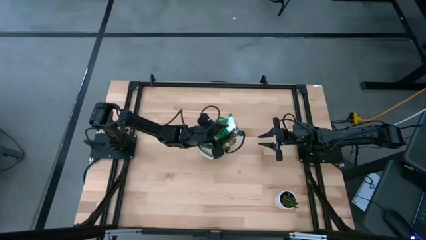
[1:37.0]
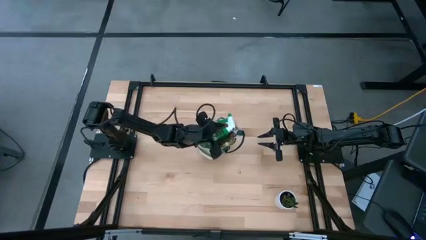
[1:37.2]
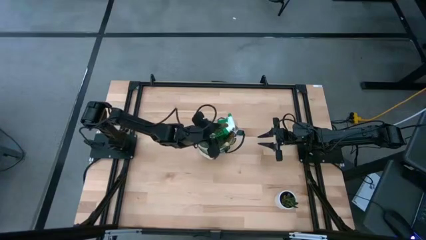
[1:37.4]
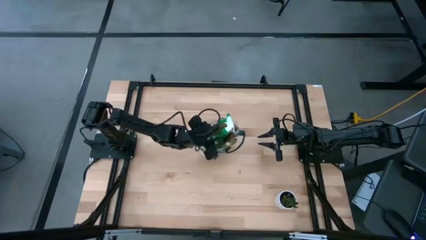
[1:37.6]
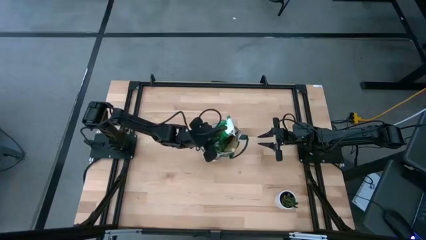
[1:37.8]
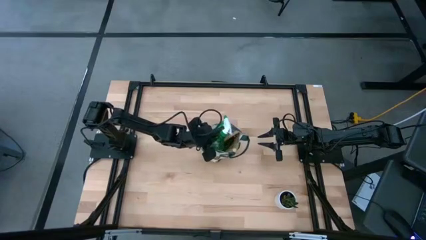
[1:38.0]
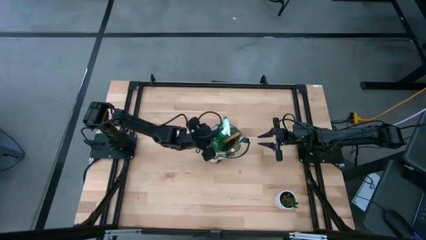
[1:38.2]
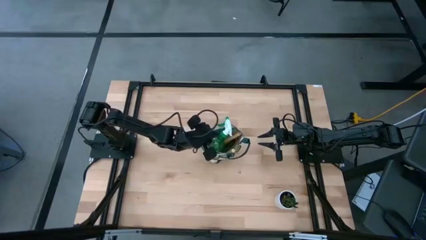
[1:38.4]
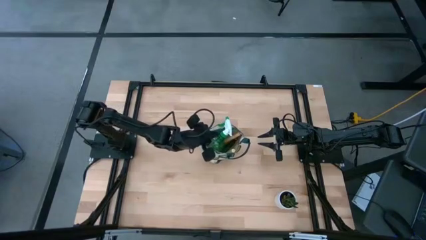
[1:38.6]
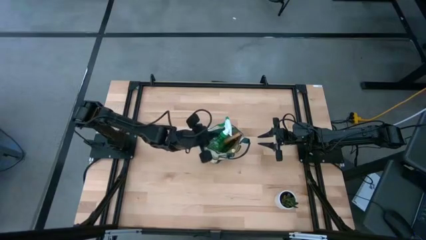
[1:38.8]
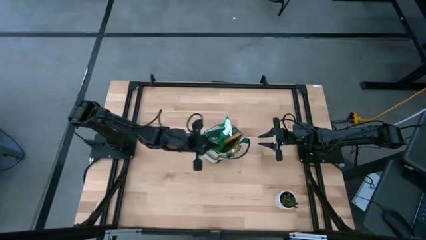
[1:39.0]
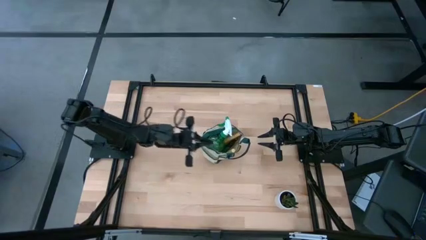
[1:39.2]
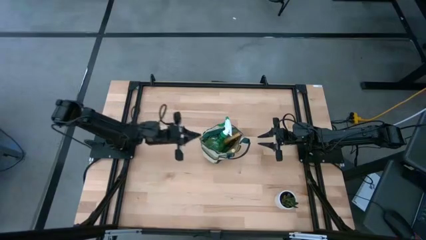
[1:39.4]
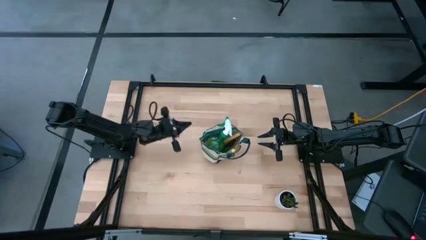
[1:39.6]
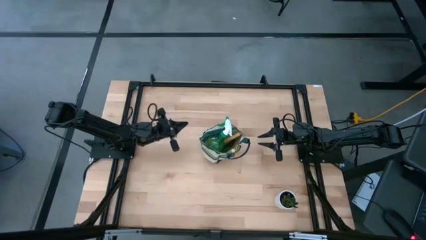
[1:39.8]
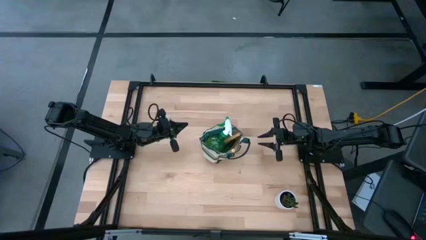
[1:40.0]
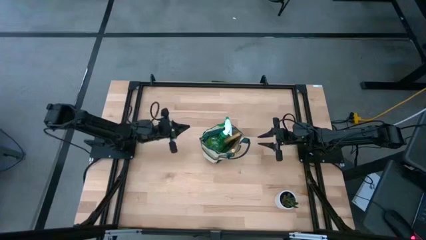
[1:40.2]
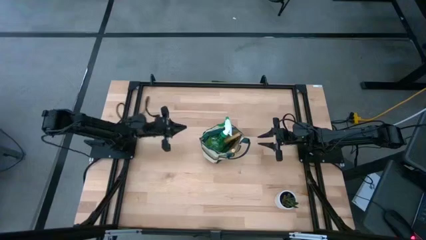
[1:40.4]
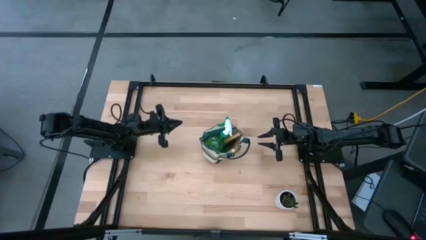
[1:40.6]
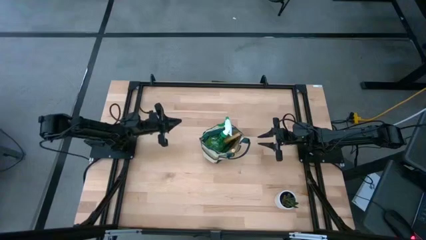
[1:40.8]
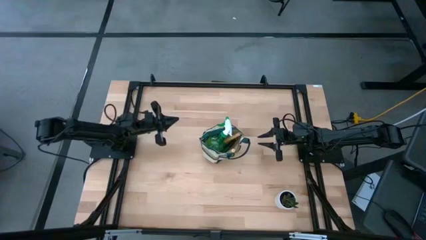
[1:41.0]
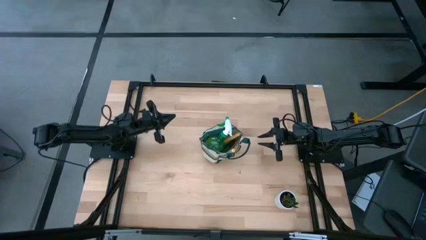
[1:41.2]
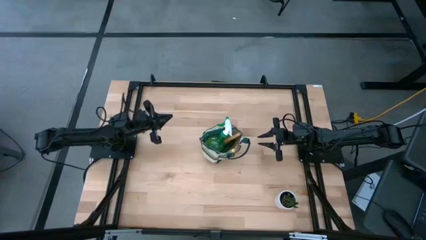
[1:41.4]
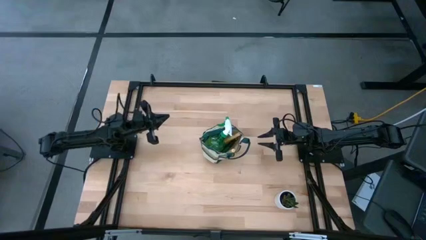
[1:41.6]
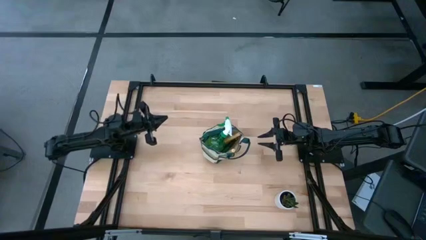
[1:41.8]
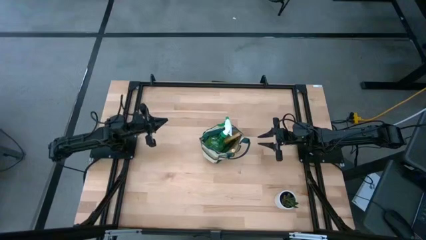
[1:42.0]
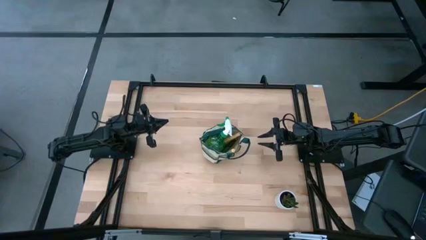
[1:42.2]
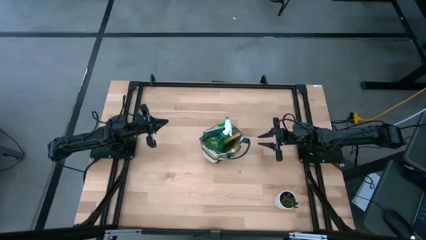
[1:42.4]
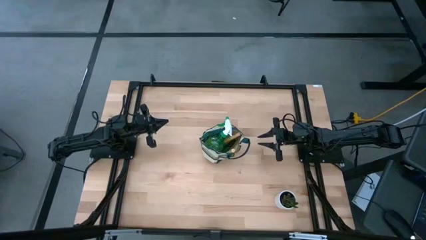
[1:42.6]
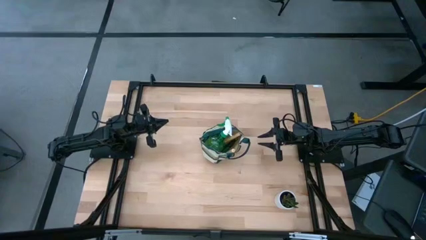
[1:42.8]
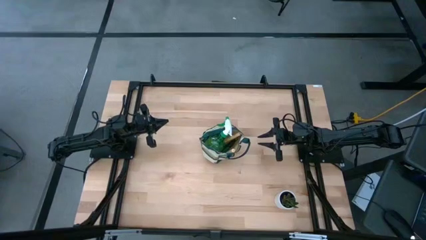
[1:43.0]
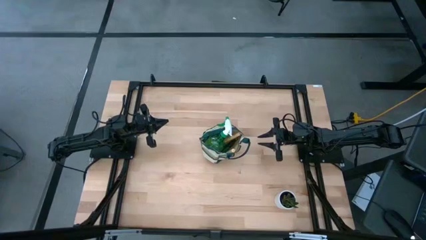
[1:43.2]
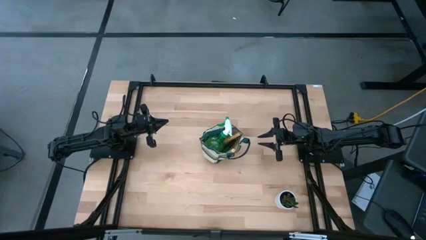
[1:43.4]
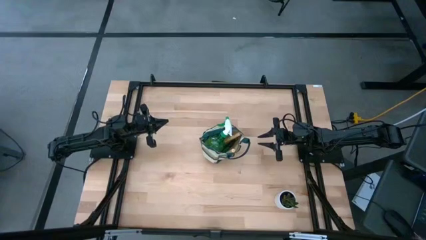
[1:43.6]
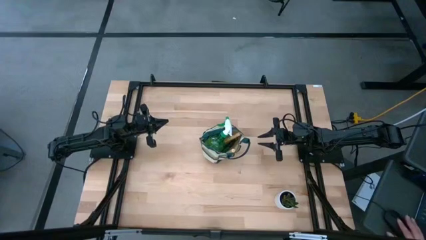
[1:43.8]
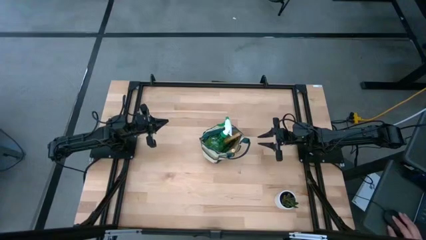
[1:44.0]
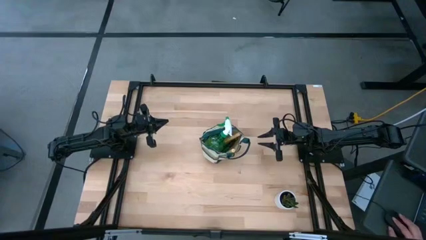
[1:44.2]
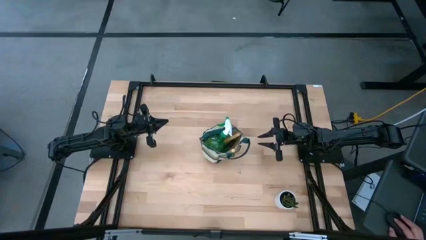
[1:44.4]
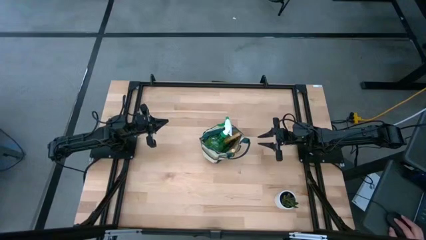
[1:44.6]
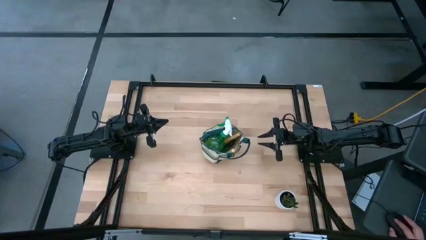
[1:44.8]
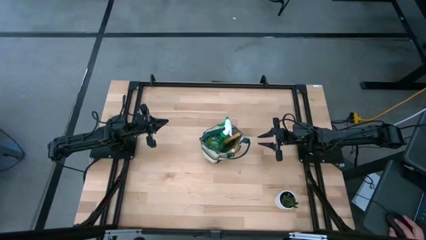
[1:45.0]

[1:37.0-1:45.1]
Task: Pick & Place Garden tools in Gardening bag
Return to Home Position

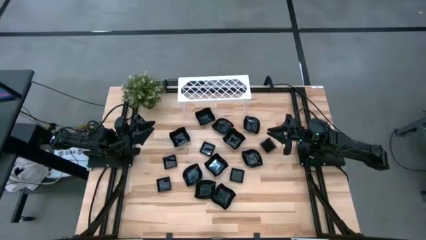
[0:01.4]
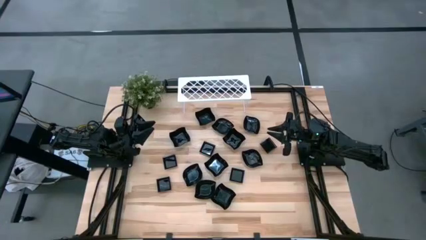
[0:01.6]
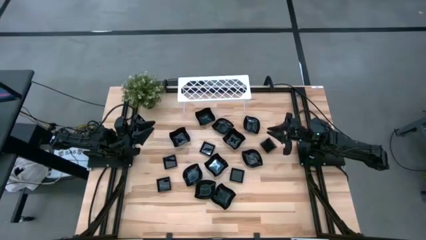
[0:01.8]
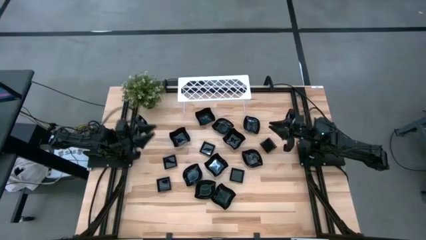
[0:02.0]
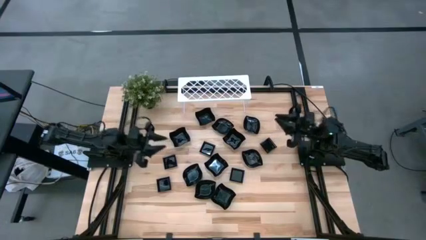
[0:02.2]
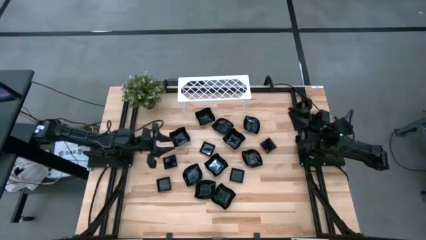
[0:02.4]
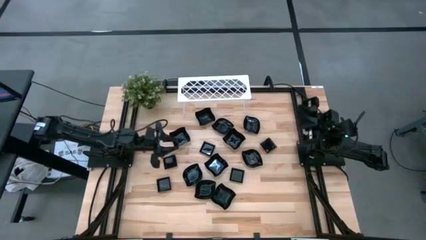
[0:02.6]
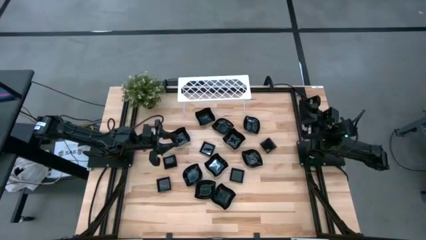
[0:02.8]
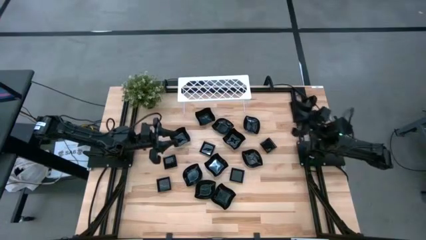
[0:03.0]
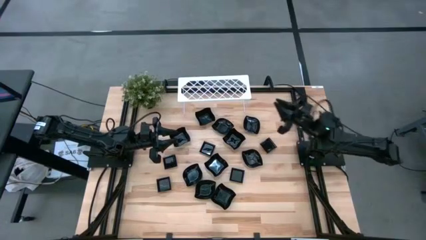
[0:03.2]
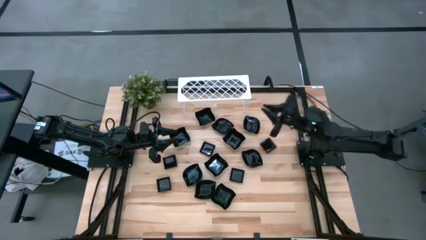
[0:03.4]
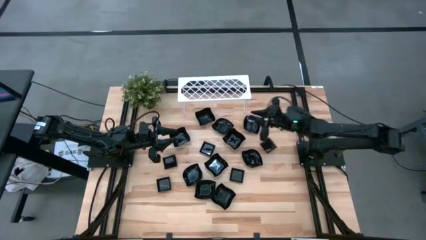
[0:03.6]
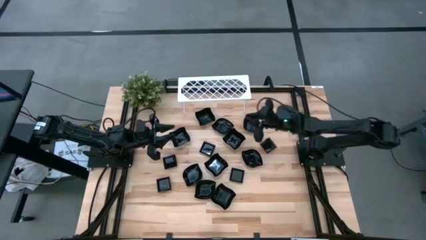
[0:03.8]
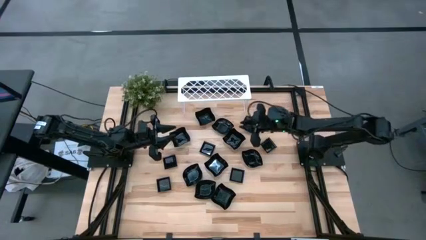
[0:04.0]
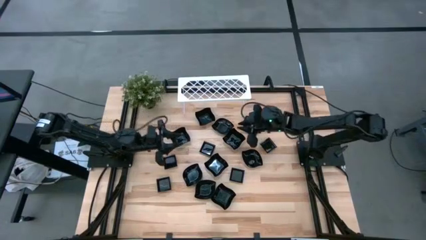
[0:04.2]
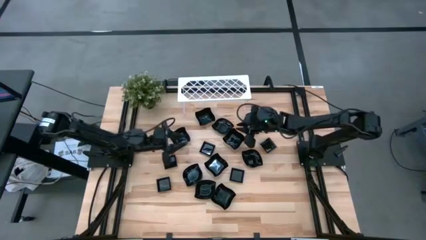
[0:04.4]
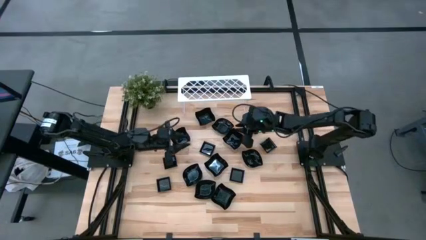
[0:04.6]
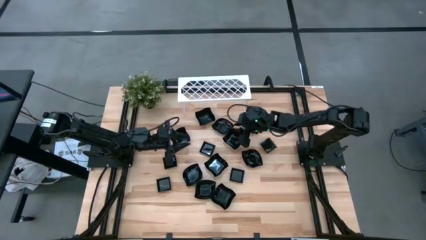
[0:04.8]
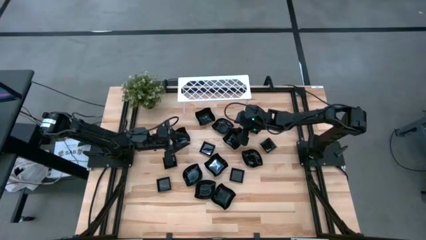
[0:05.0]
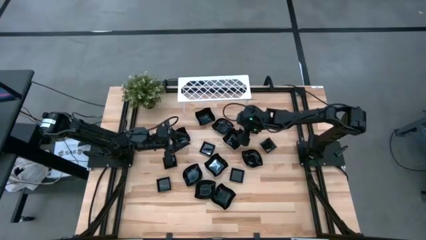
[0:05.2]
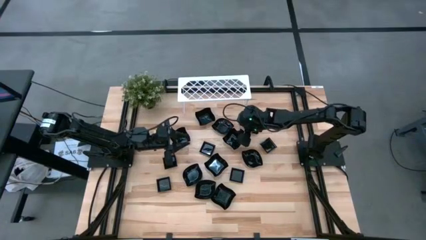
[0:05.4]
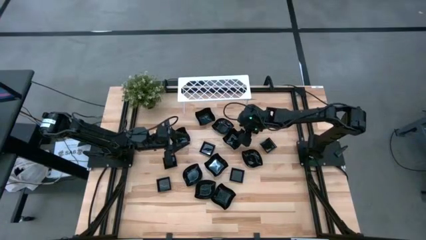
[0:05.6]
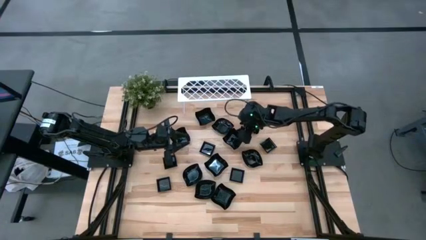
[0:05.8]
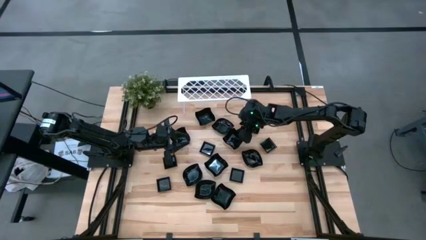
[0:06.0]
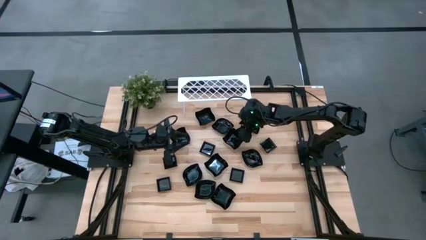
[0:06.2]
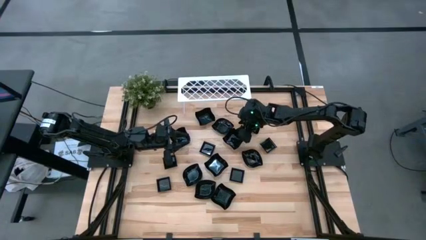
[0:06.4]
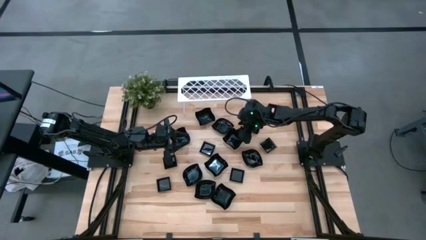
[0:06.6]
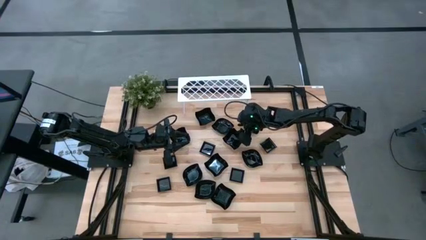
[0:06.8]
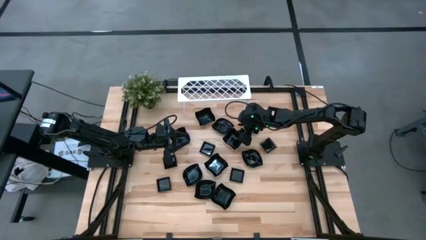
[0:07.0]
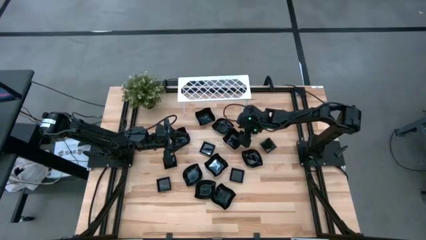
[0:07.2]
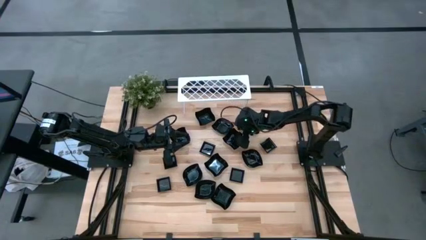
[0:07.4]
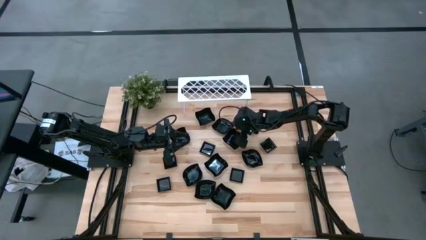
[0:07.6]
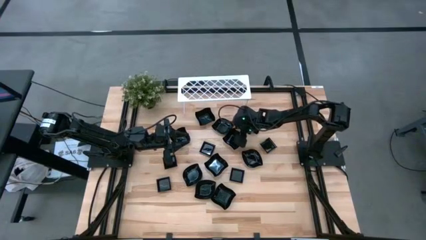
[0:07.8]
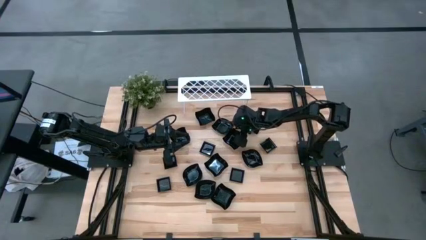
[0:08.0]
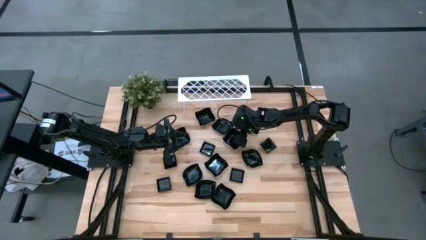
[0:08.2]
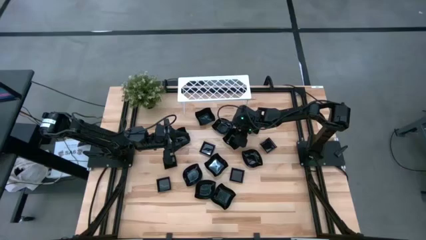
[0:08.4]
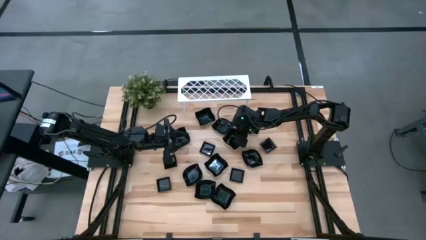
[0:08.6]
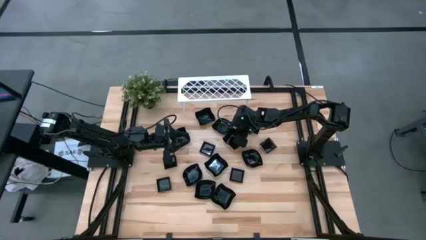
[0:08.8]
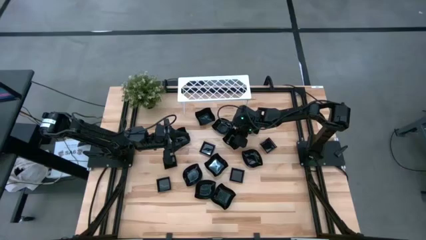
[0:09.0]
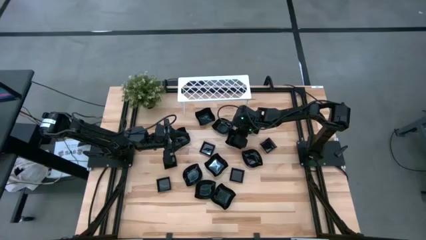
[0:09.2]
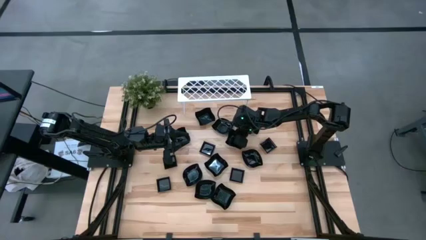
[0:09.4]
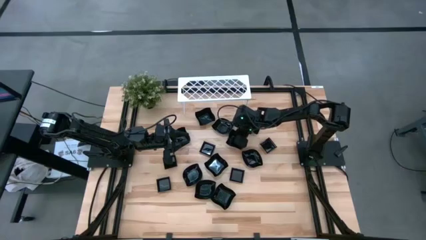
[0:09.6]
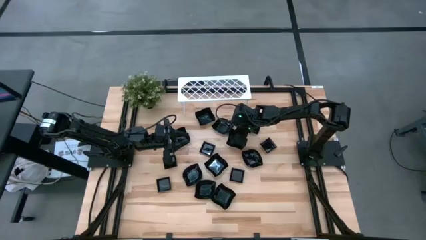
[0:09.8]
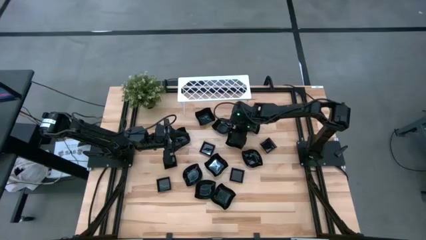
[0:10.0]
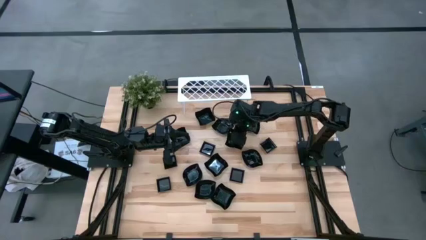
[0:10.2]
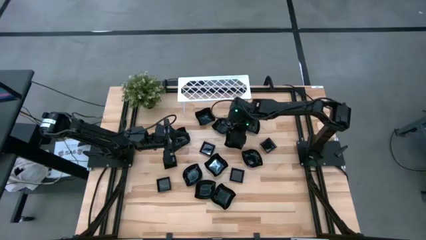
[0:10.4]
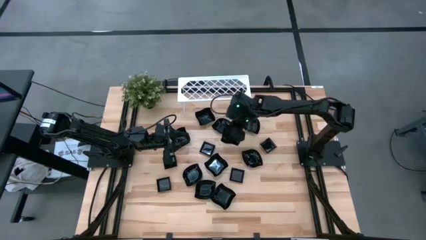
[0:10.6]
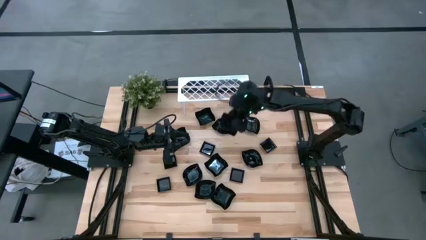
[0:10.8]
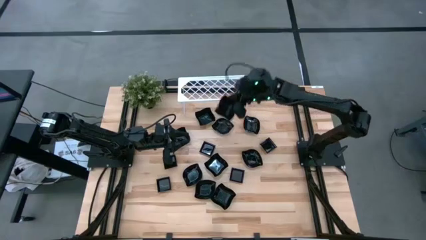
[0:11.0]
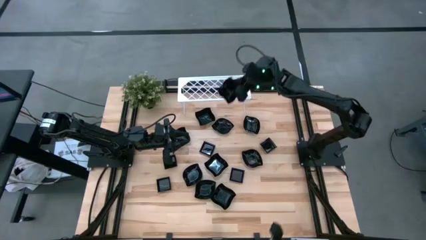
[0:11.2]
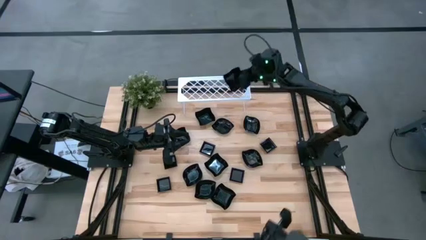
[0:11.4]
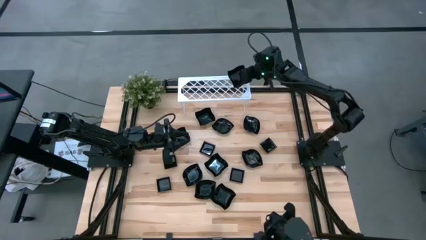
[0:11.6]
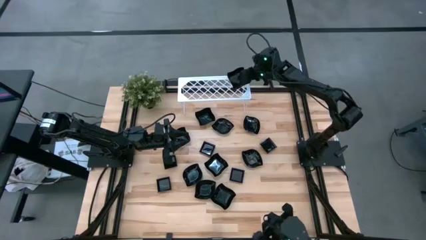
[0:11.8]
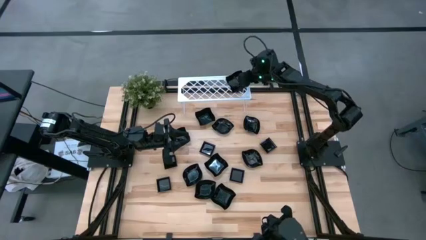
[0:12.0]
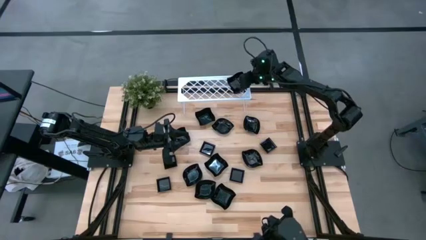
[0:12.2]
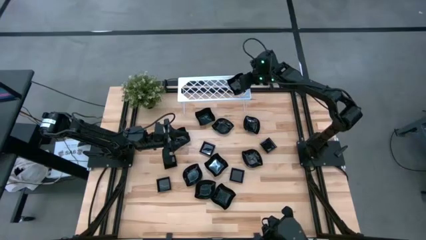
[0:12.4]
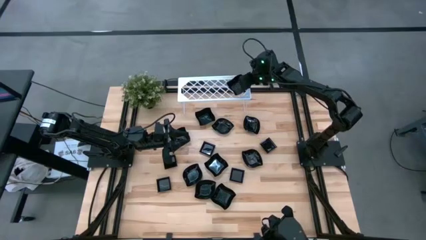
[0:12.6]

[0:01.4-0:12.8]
Task: Pick & Place Mini shaped plates
Put the black distorted square plate on the shelf
